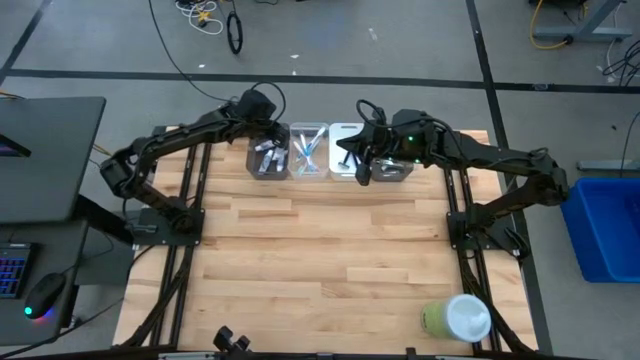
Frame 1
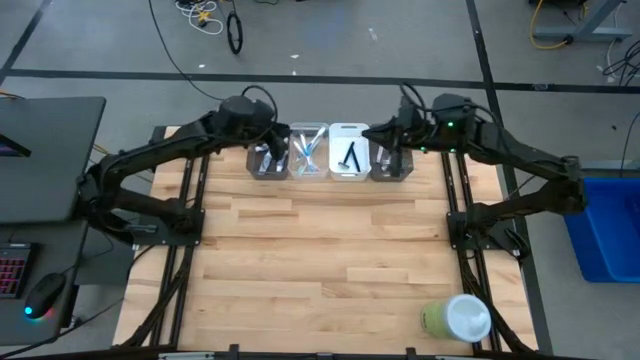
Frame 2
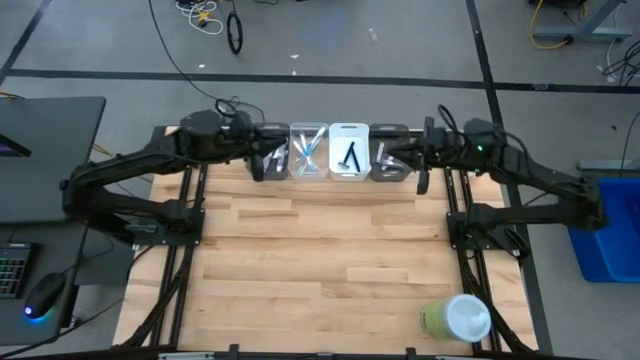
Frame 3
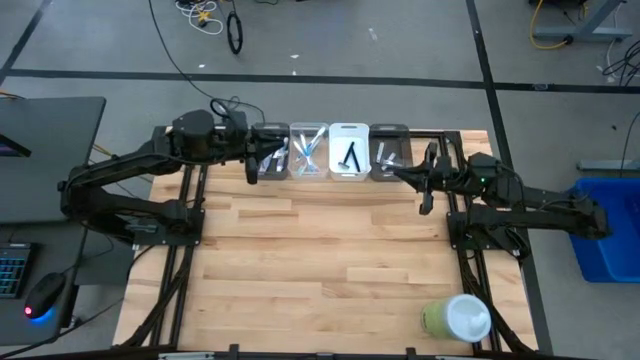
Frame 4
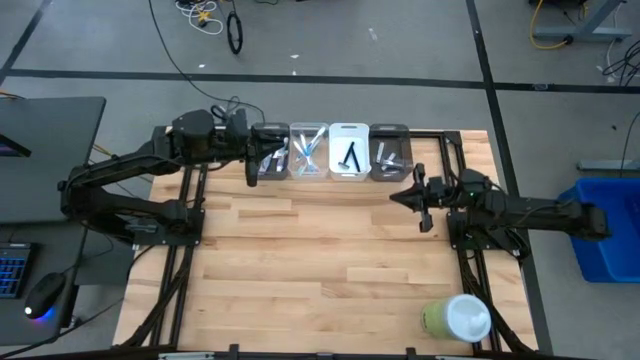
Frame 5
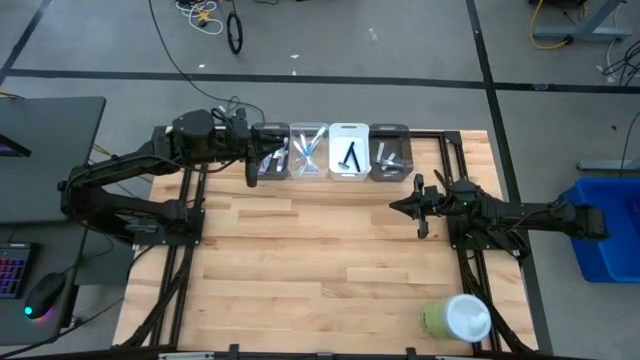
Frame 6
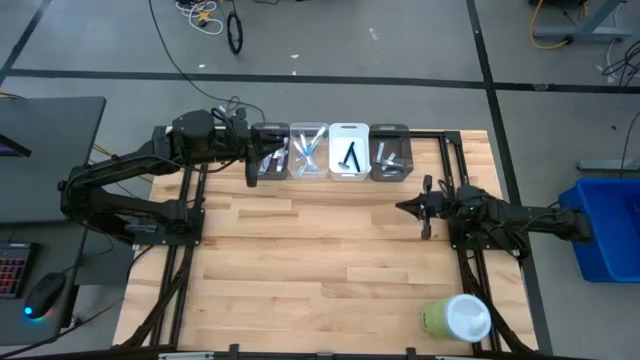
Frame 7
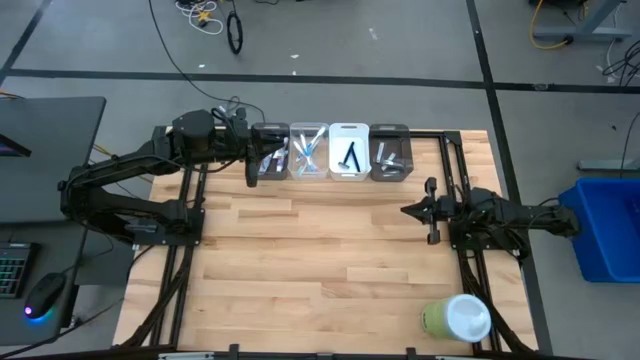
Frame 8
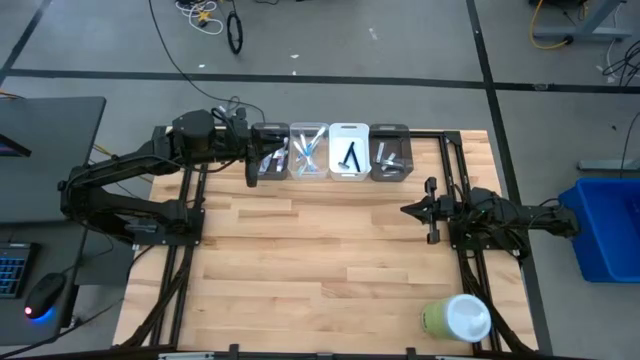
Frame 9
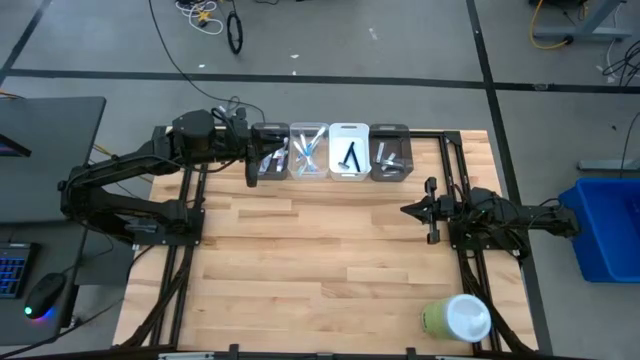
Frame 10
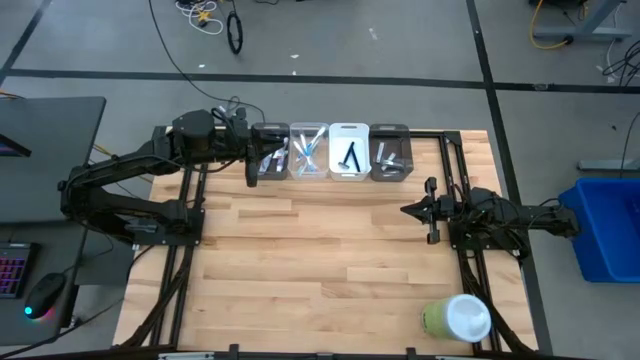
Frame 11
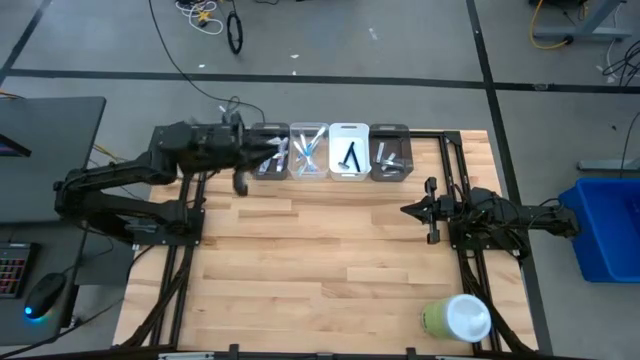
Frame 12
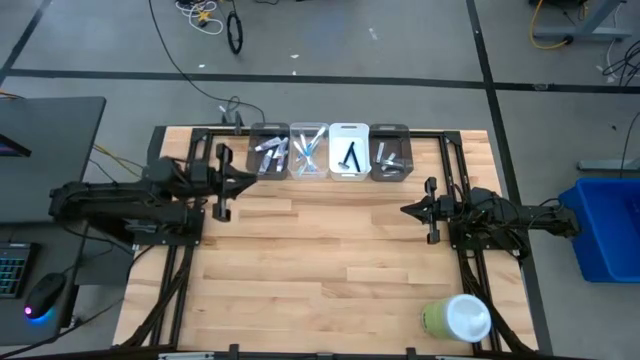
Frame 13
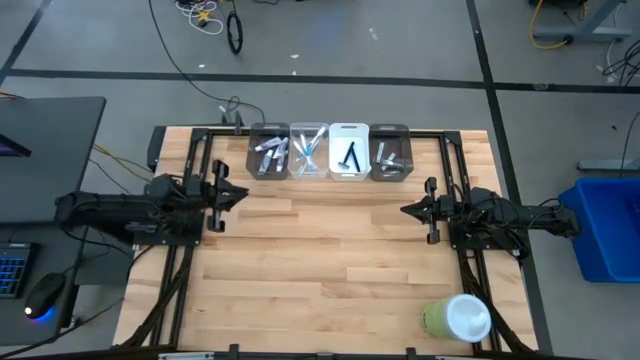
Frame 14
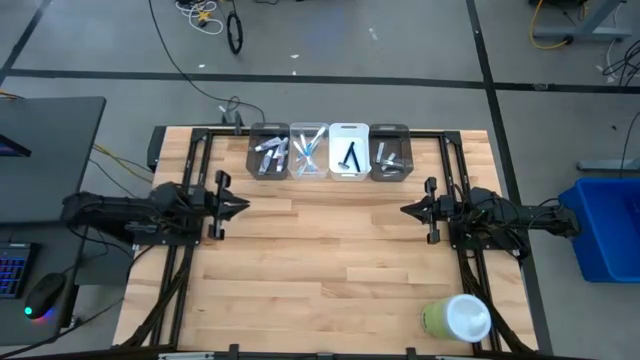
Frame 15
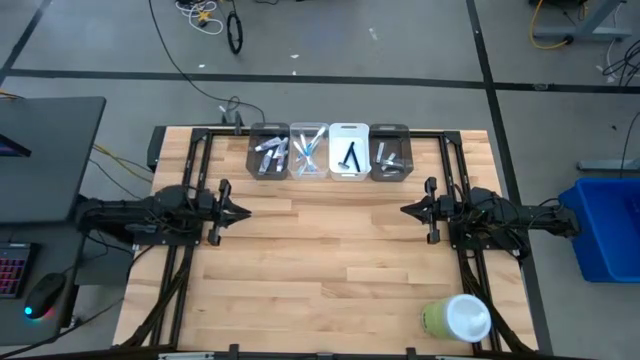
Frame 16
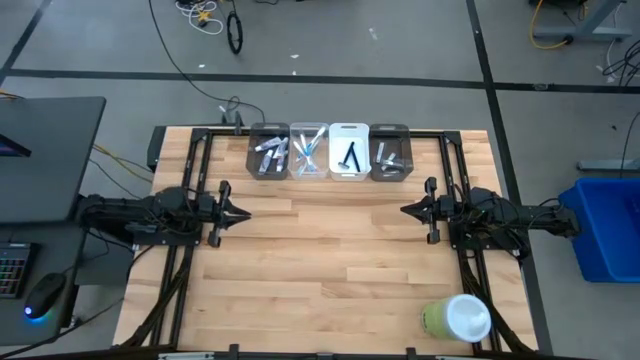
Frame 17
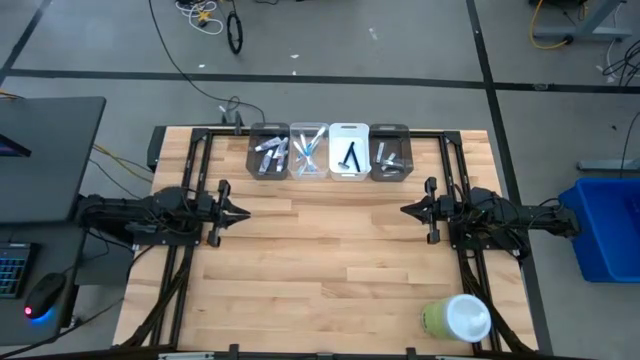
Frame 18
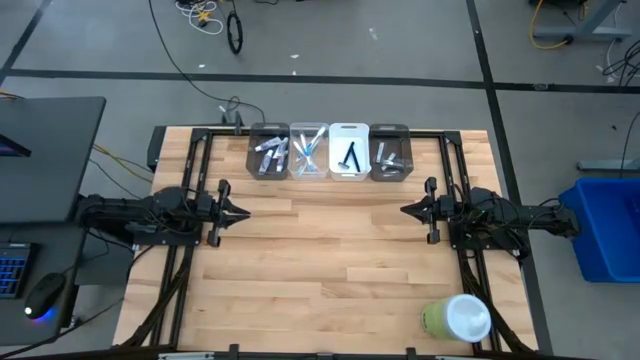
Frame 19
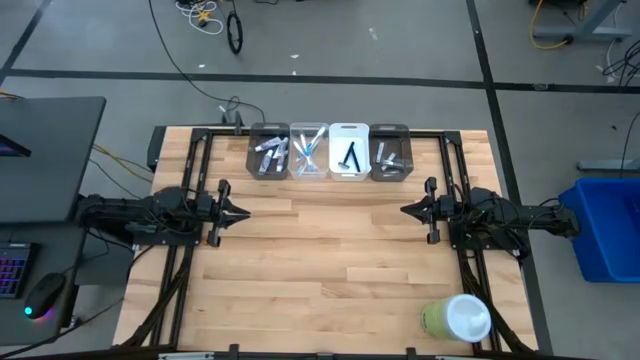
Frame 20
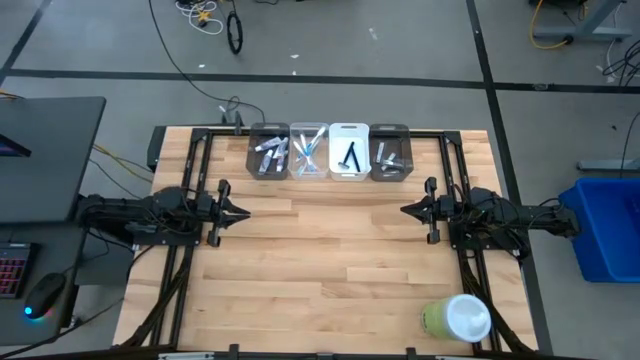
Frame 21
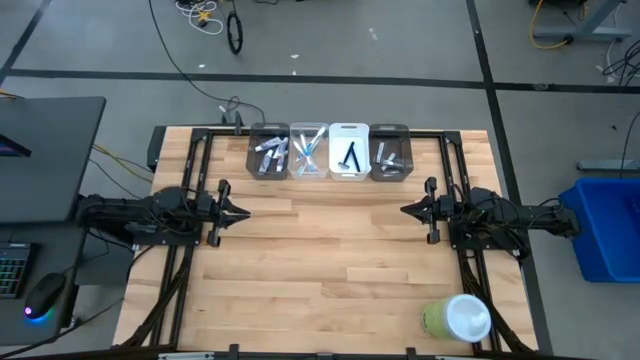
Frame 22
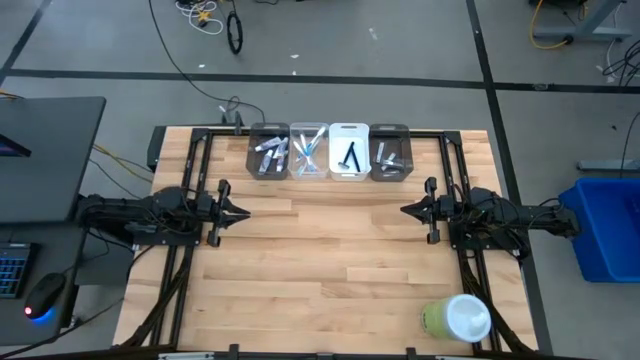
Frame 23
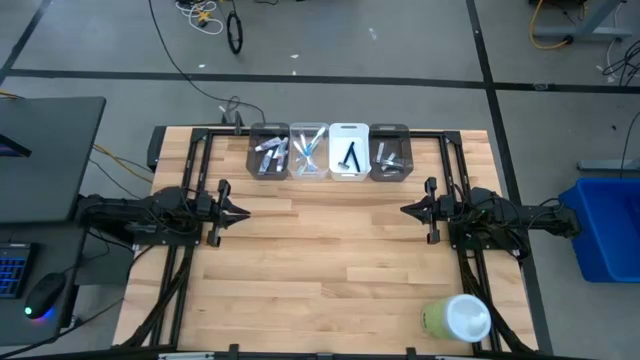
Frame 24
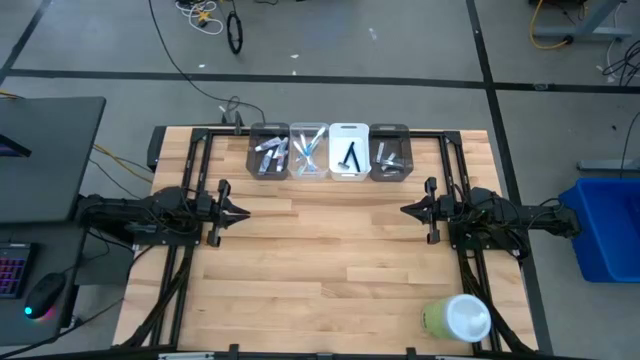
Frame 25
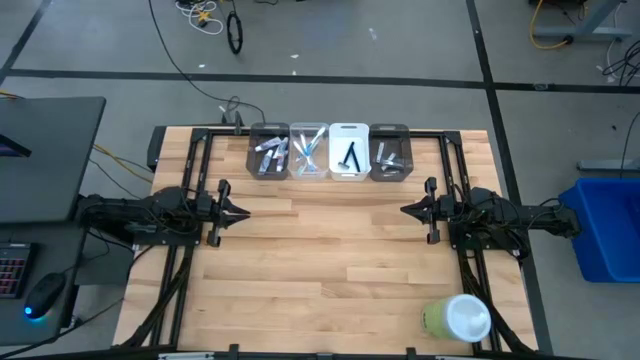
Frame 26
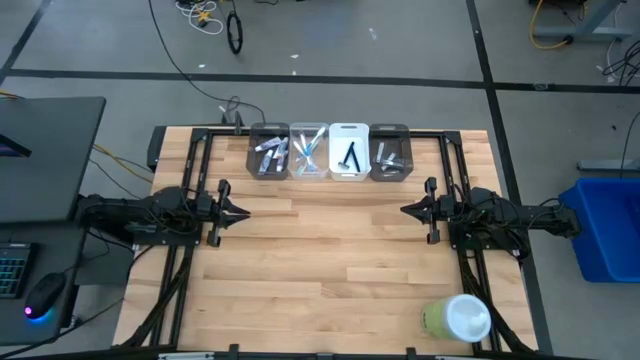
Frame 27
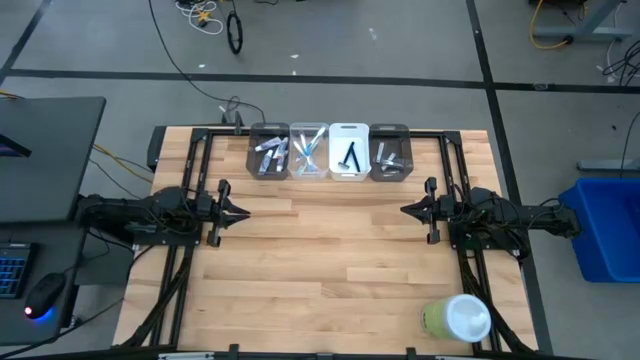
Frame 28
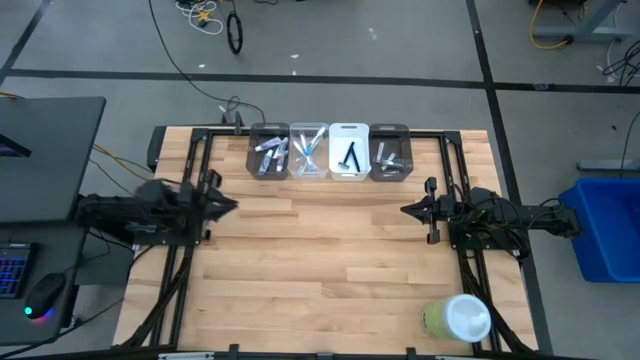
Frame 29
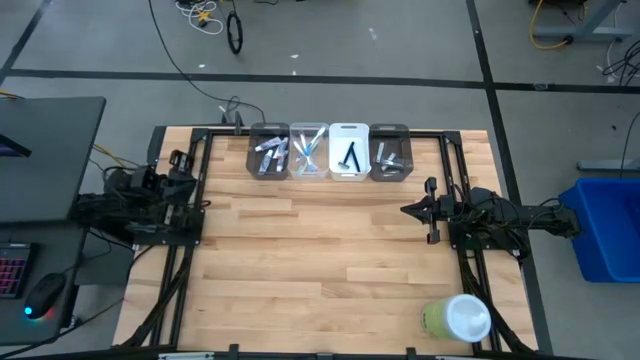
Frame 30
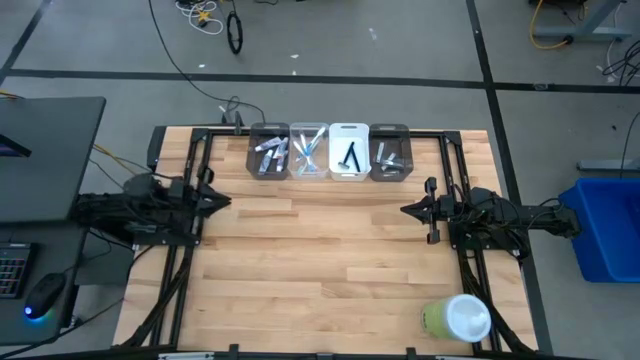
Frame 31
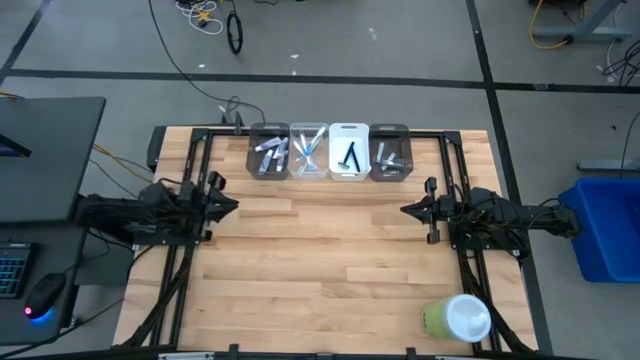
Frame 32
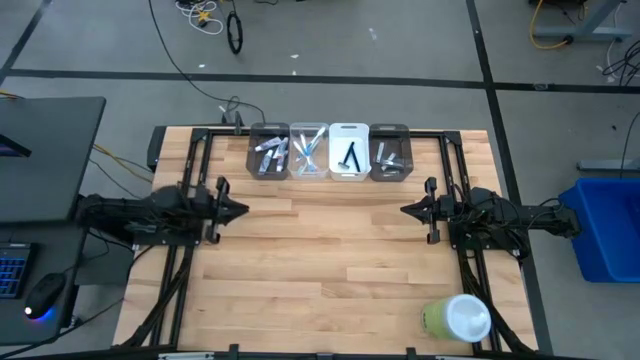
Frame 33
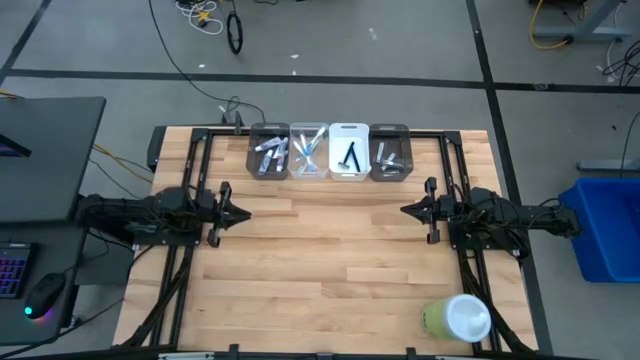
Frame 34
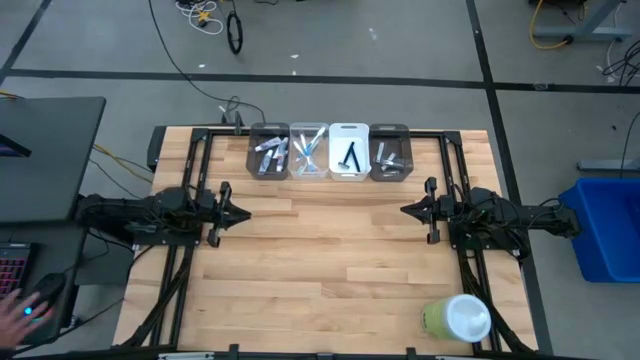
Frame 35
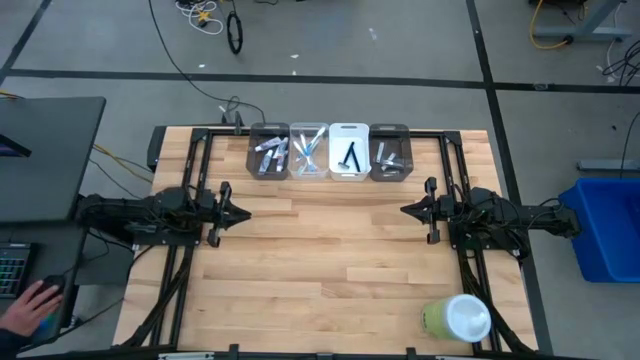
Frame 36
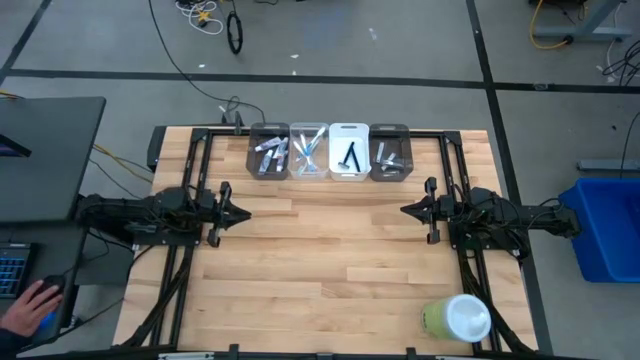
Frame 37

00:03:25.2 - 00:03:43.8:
Task: Pick & Place Travel size toiletries
Return to Home Position

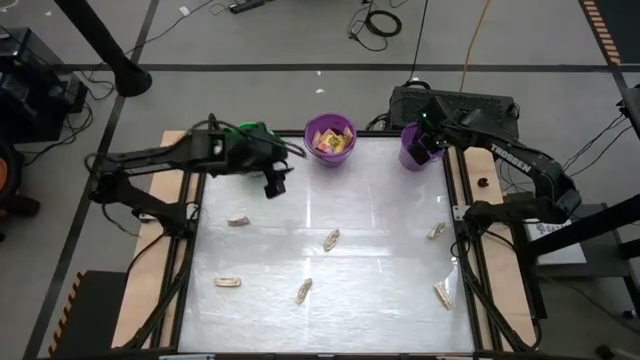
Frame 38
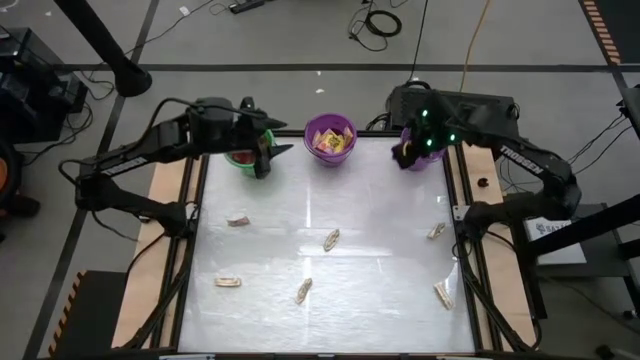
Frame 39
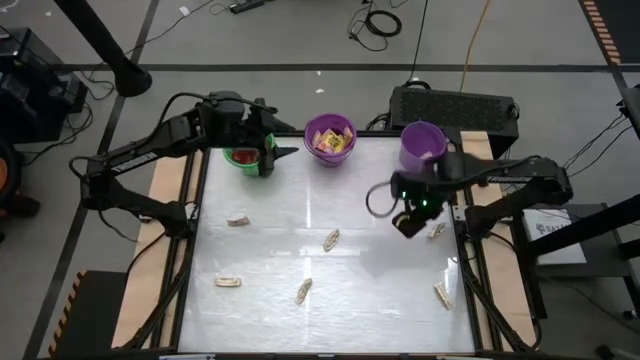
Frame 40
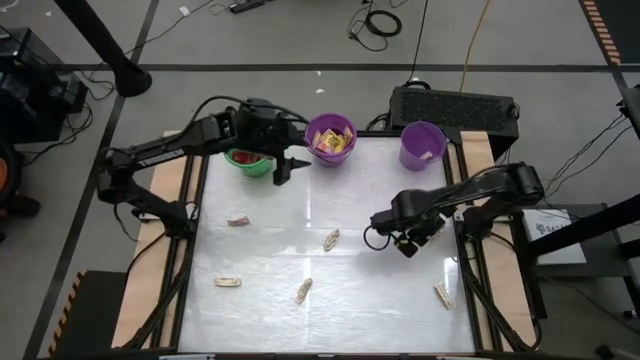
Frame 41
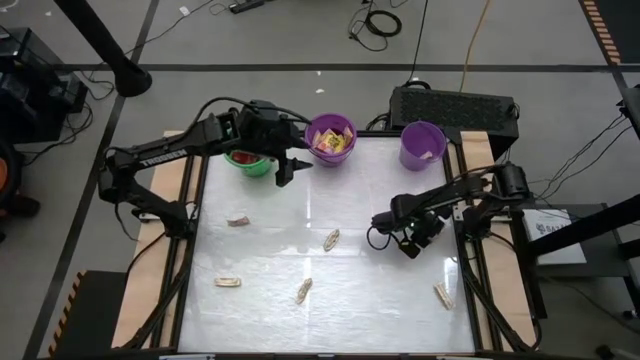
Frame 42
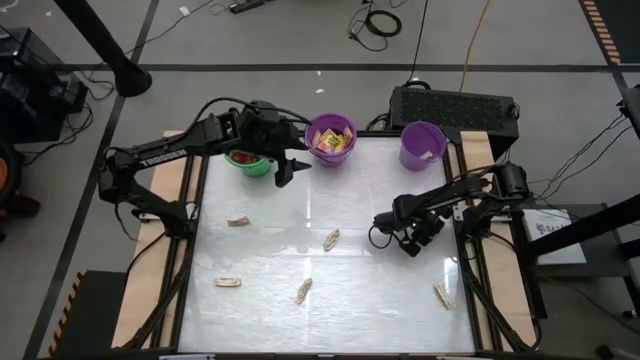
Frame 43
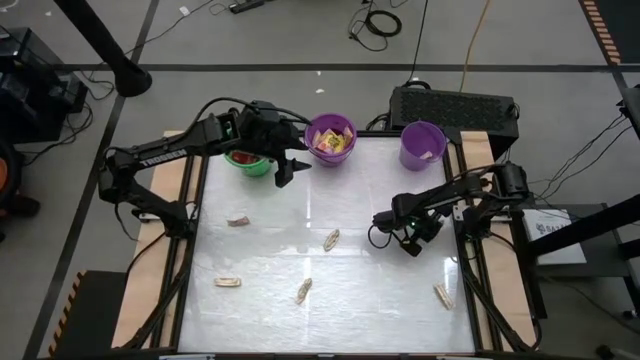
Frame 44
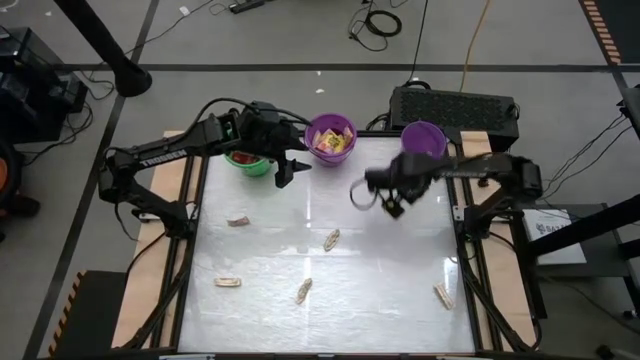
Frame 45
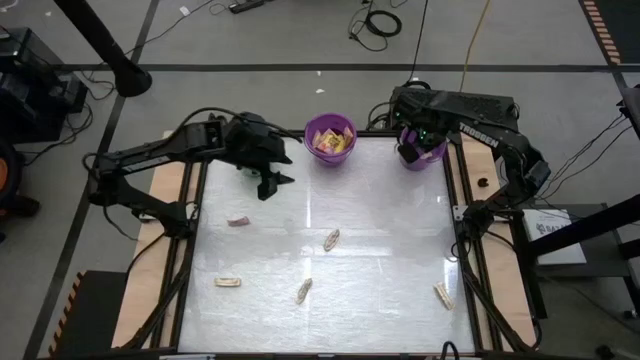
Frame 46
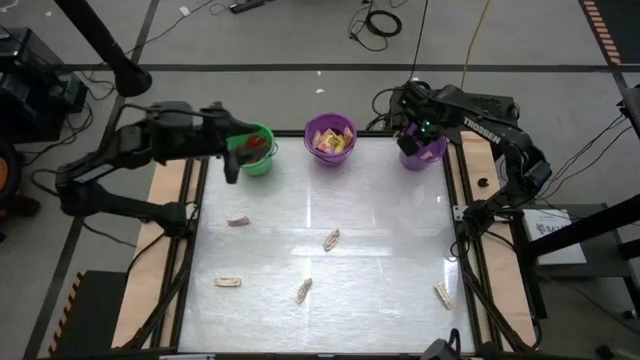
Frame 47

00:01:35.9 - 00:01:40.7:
Task: Sort candy by brand, put in halloween buckets
Put the white candy pack in the right purple bucket
